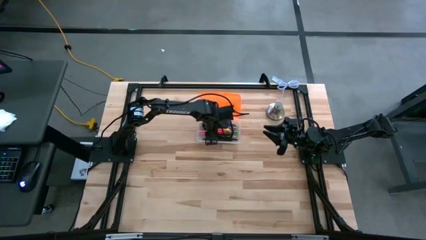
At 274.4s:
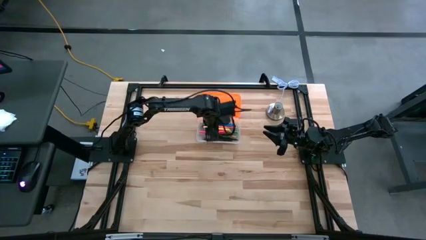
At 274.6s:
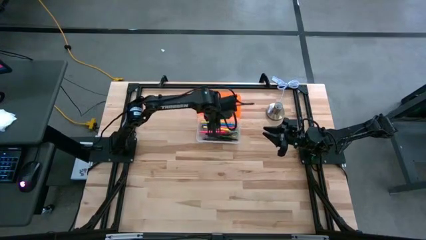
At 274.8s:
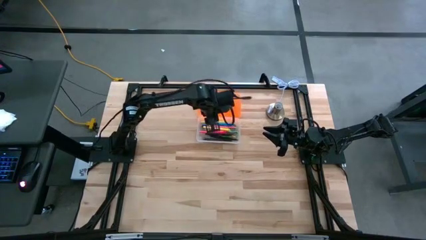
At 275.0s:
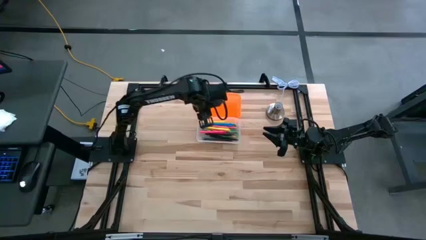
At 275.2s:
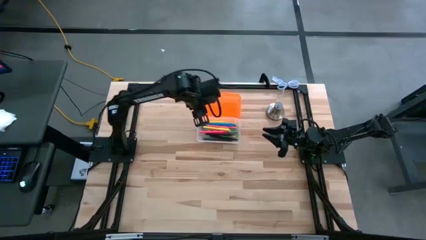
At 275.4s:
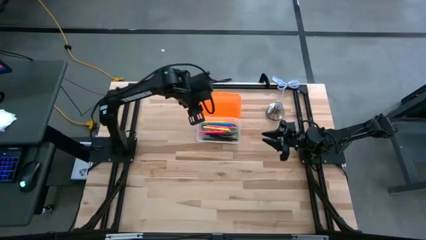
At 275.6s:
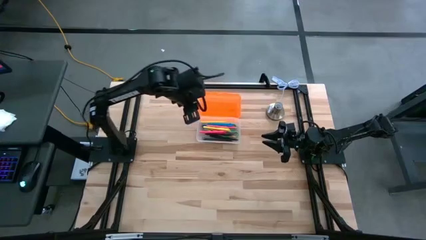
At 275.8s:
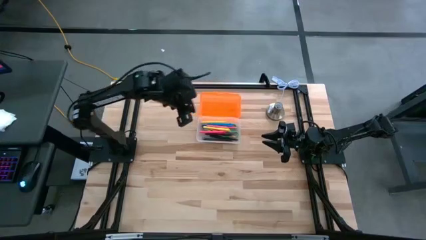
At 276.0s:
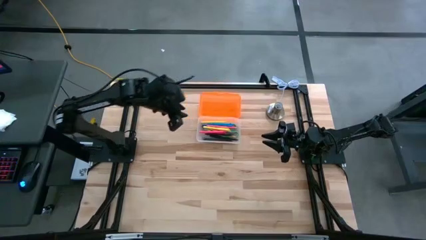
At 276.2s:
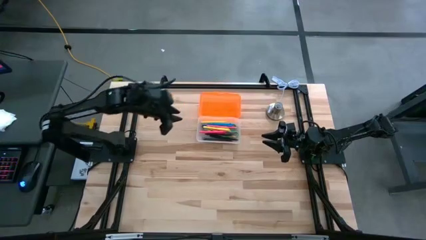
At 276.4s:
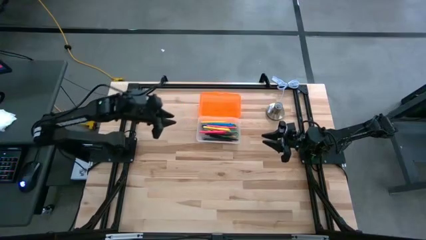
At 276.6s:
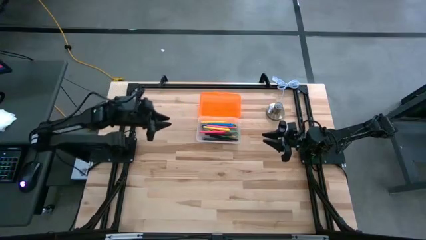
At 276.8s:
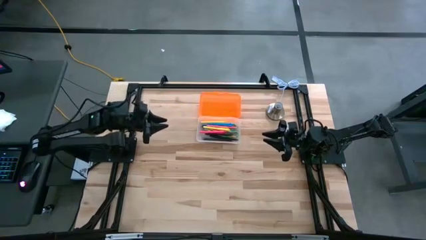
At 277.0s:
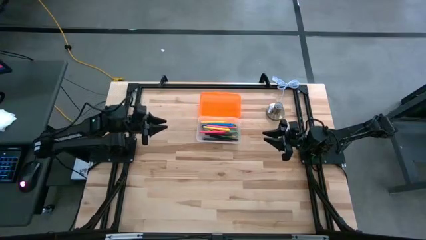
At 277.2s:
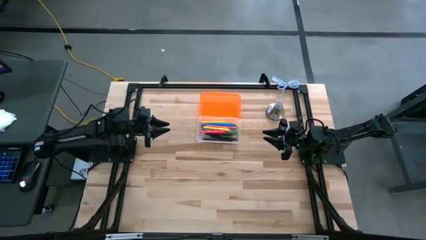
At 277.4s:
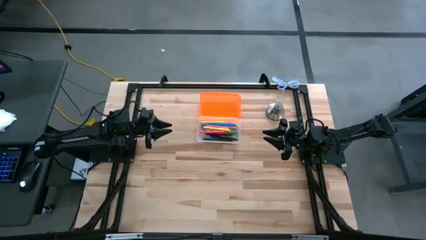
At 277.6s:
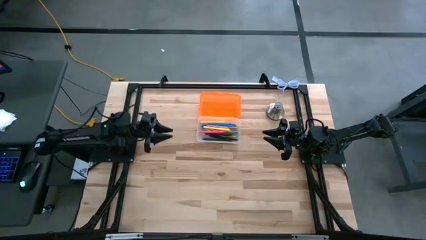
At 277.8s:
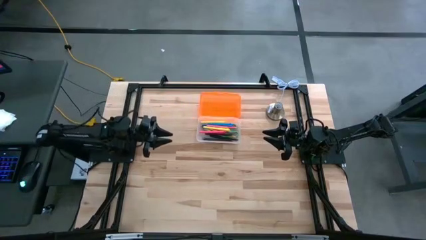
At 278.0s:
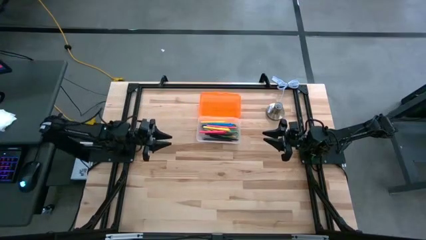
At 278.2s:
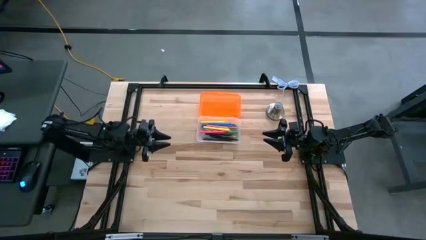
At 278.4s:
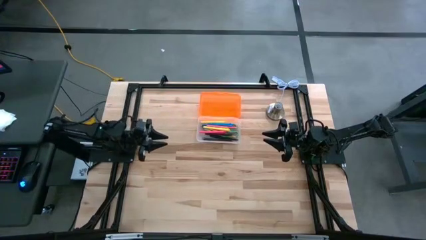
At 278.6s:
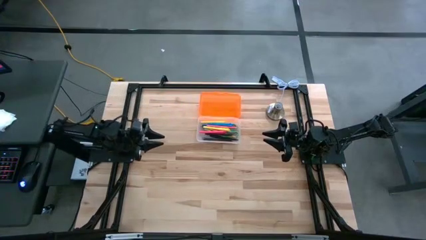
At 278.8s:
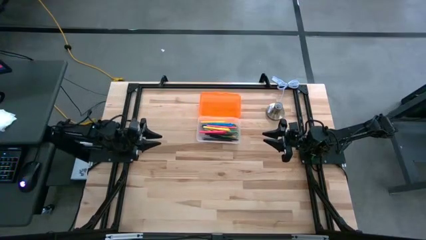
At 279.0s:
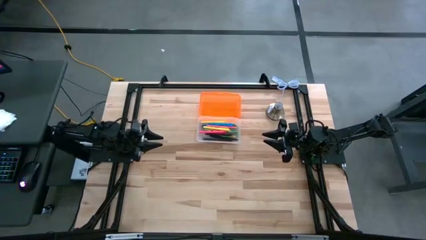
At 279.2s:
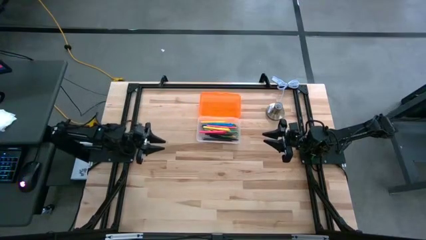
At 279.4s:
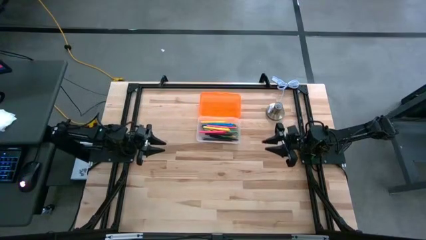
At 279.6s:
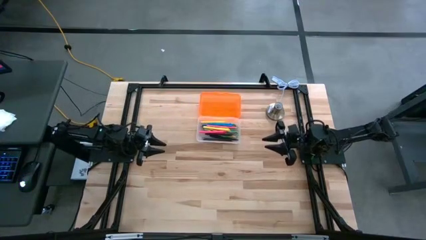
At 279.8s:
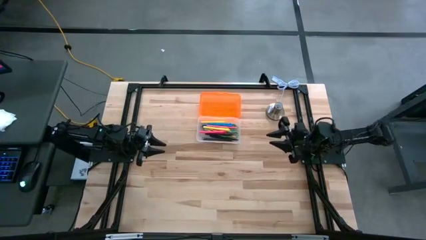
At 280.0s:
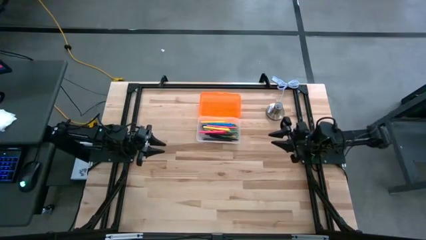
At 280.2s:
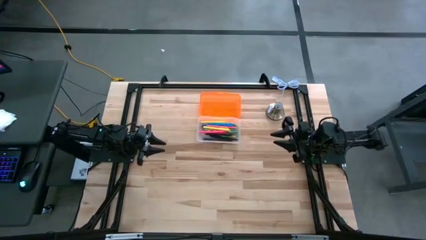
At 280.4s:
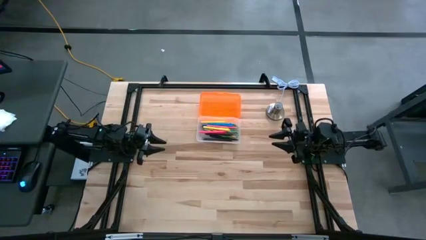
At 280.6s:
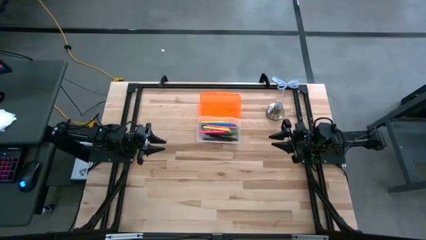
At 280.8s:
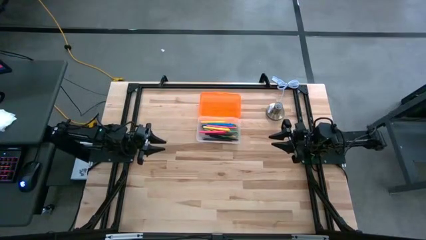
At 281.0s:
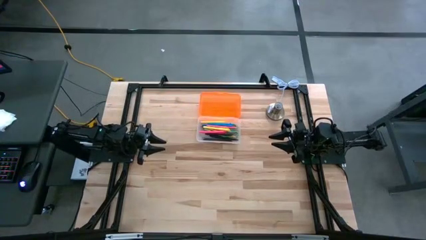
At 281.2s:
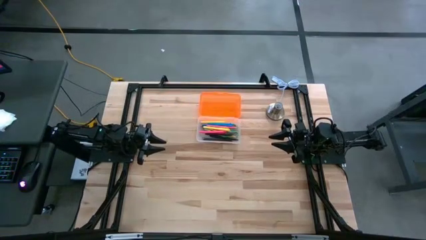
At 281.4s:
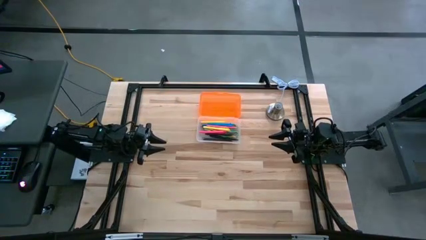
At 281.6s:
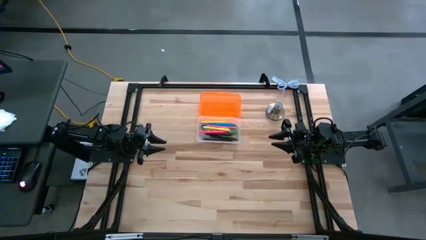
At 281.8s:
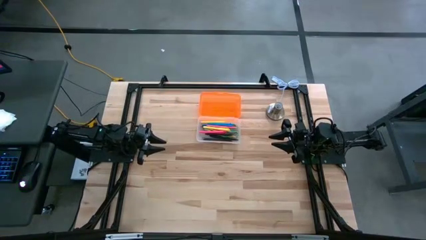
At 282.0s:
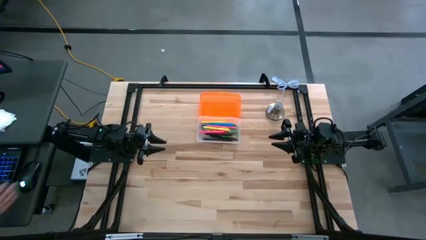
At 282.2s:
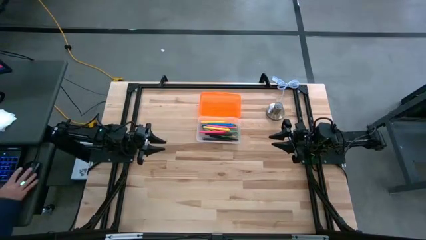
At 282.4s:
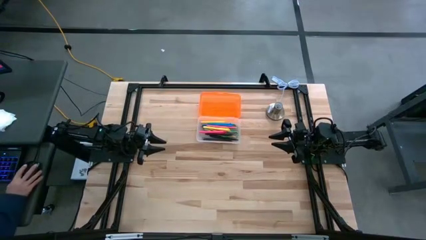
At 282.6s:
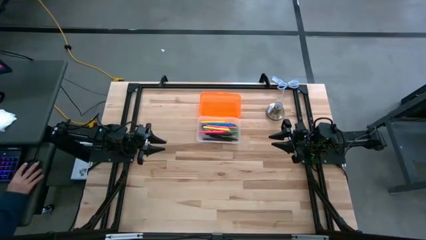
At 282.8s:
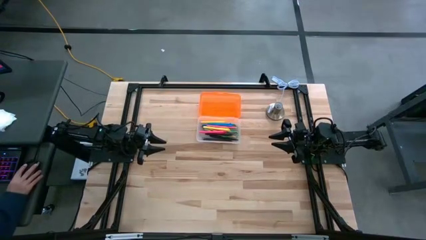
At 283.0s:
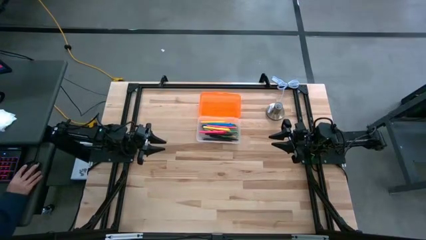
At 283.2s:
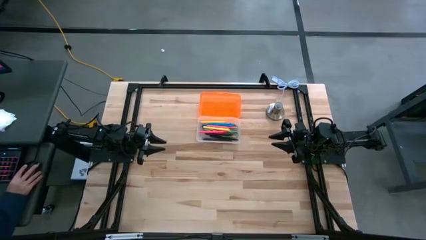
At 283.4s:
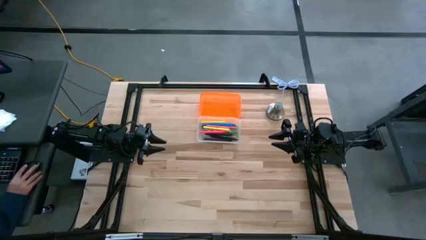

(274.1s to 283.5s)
Task: Pick & place school supplies into a supply box
Return to Home Position

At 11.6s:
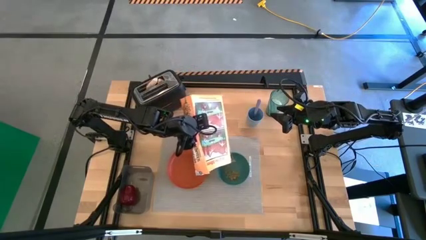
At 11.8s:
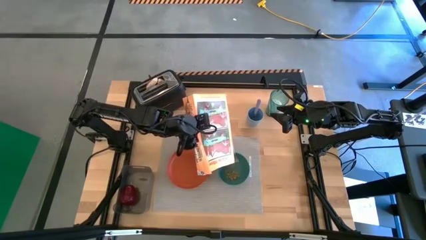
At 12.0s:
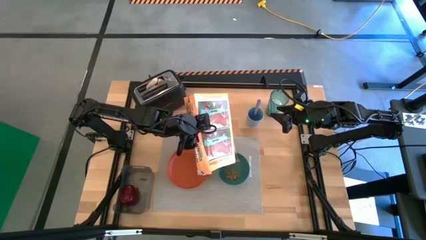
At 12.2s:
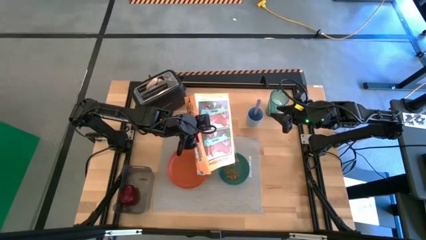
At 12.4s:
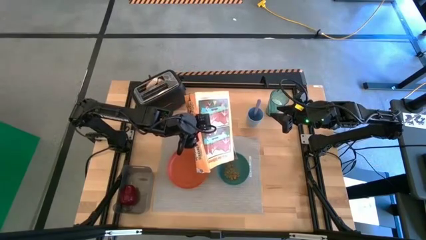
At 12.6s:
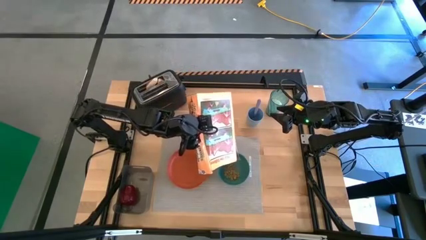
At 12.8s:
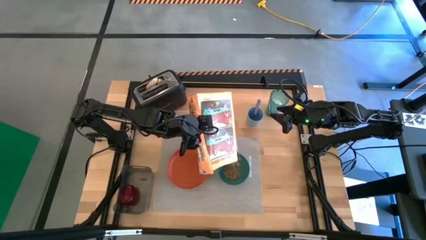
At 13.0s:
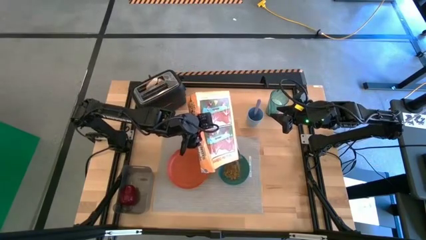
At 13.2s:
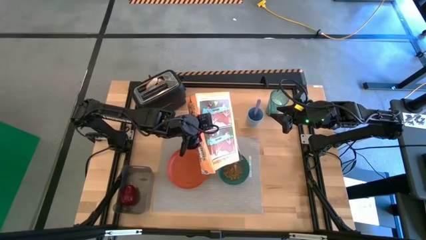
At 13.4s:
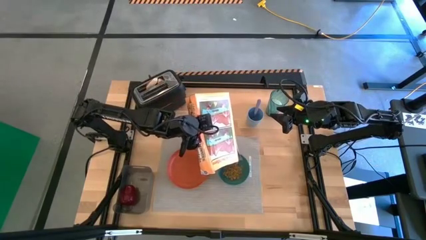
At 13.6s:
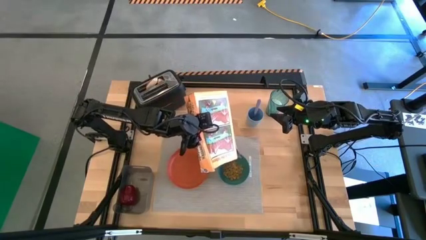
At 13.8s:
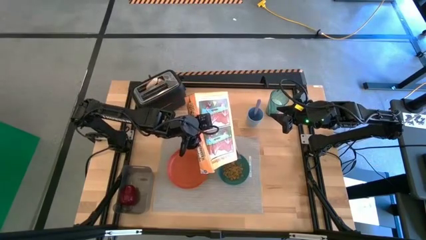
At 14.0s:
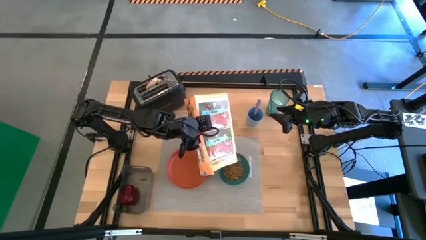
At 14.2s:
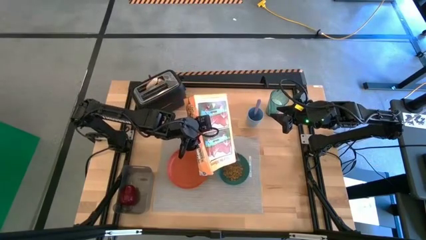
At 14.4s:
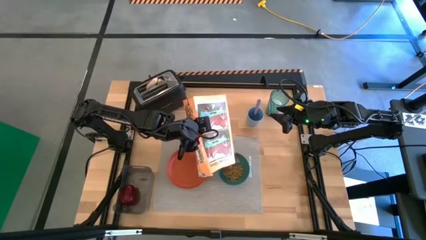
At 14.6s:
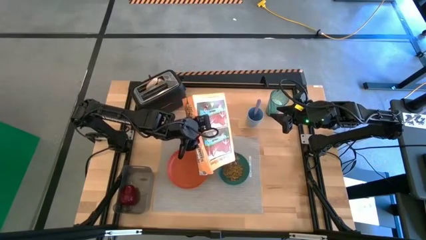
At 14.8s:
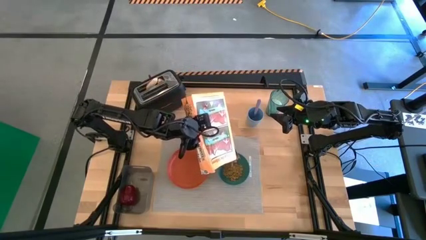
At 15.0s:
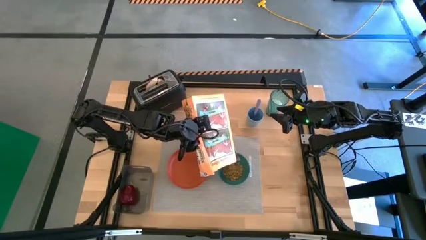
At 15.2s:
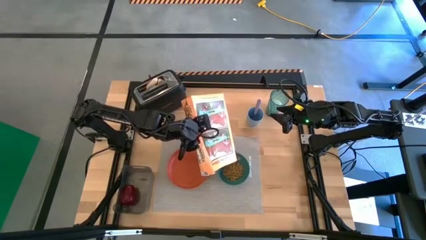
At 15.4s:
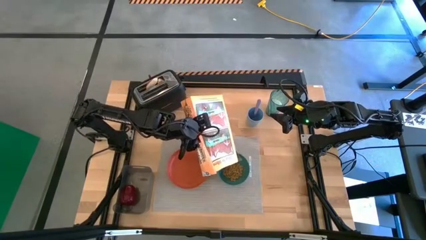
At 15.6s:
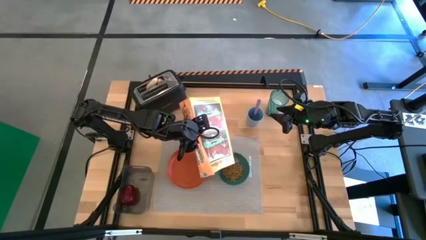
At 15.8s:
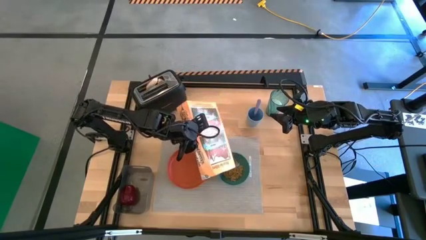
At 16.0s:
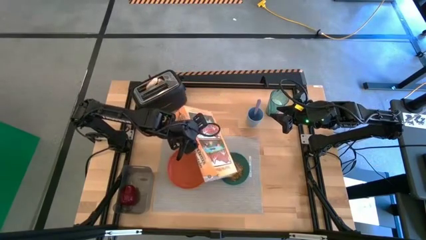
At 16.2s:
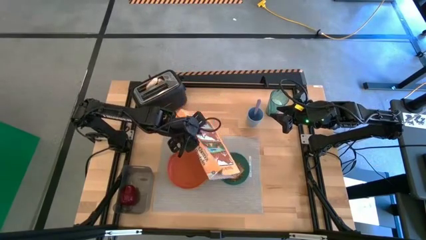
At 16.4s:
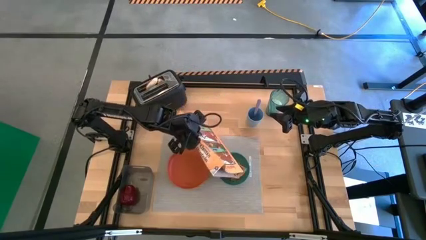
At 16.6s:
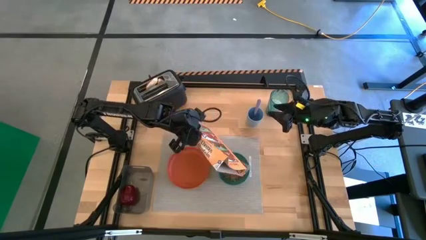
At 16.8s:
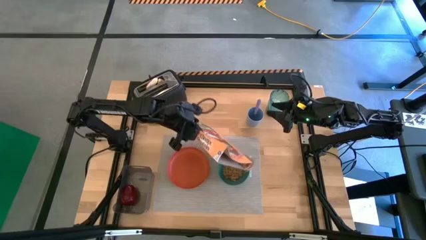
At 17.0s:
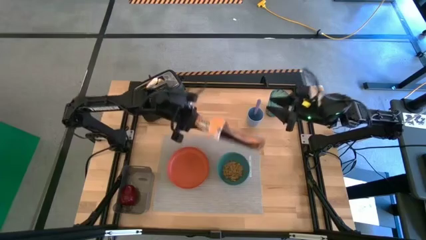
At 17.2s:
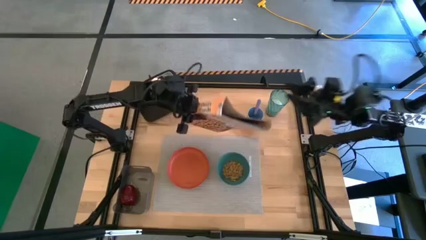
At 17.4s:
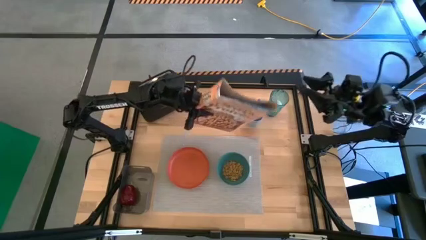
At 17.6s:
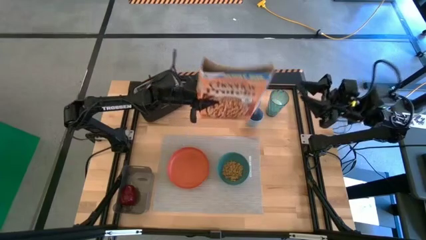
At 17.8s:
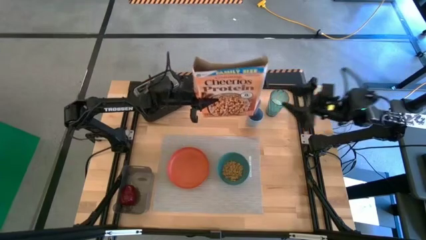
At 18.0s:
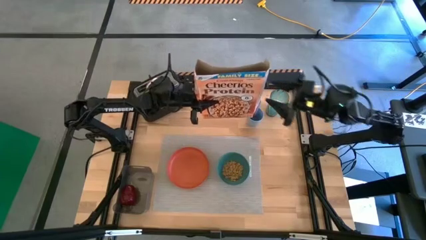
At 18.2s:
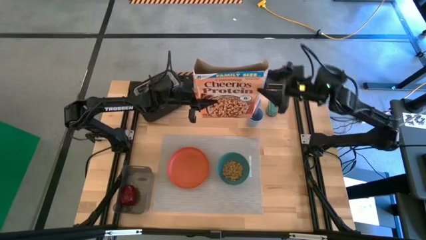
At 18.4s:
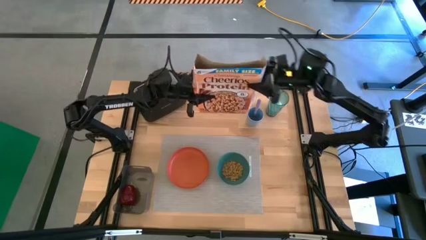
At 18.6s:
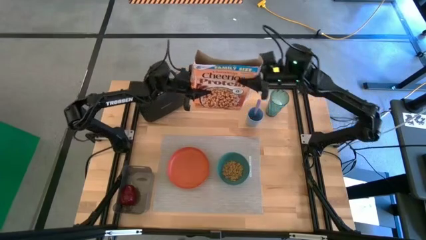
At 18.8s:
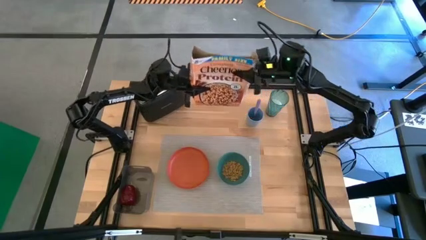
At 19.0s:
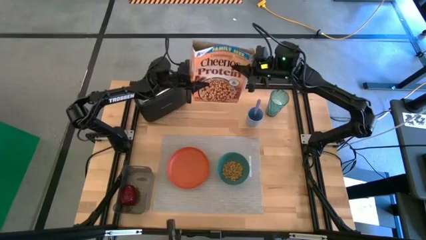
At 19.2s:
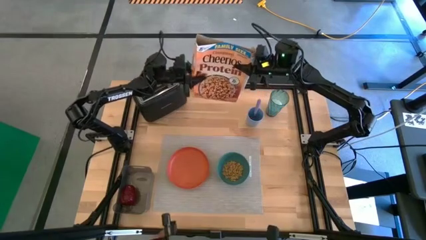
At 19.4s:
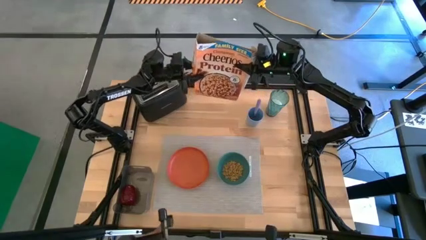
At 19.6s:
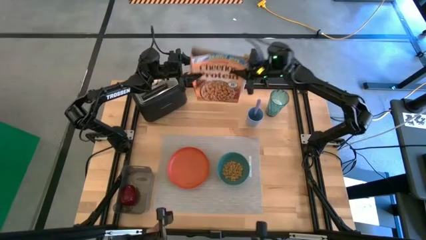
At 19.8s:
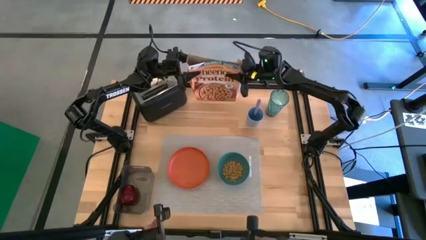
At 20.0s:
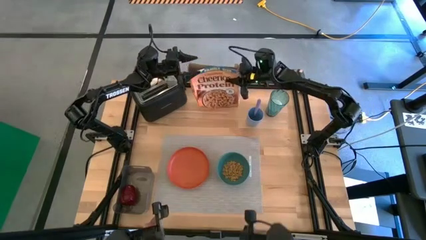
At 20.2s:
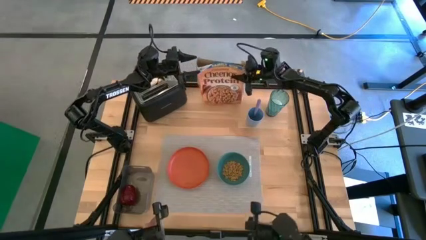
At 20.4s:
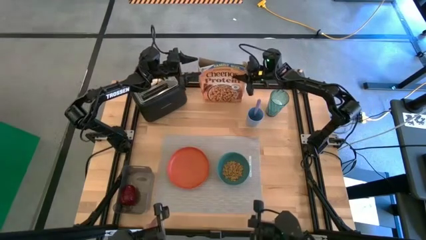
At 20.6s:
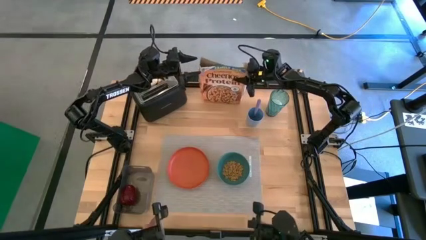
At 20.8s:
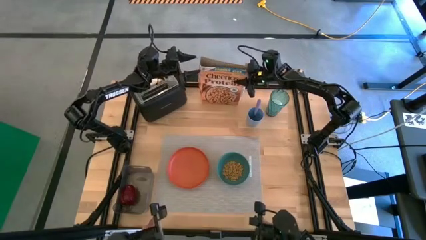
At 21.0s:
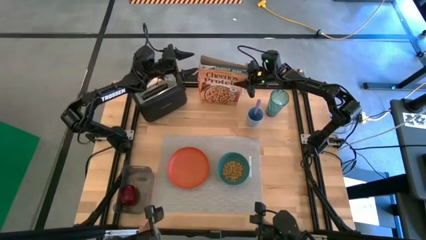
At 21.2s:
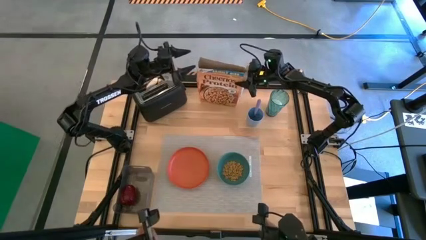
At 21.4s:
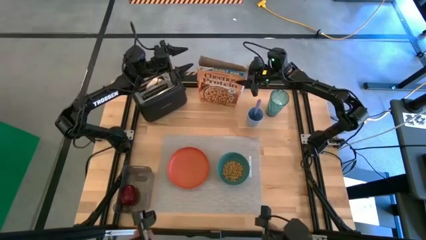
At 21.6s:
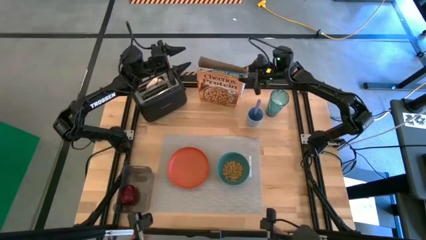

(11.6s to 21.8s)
Task: Arrange a breakfast setting
Pour the cereal from the cereal box into a green bowl
